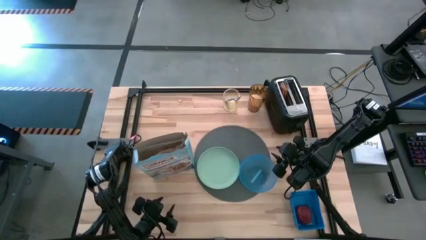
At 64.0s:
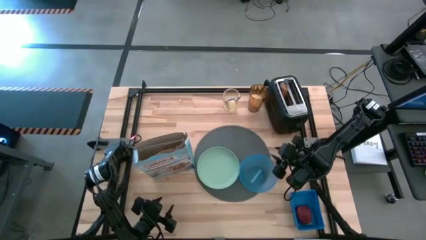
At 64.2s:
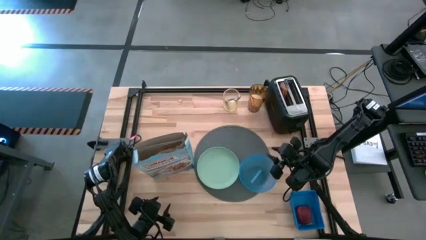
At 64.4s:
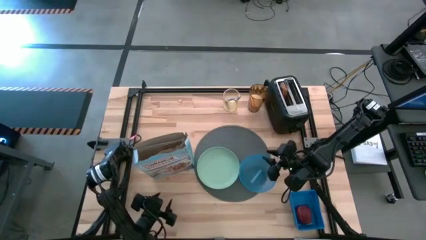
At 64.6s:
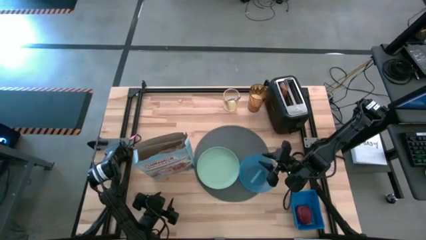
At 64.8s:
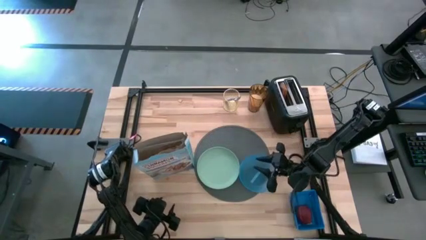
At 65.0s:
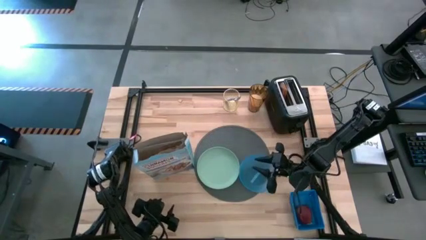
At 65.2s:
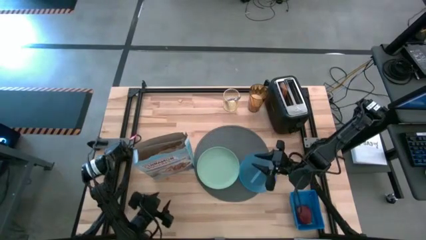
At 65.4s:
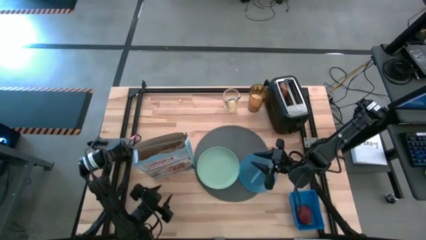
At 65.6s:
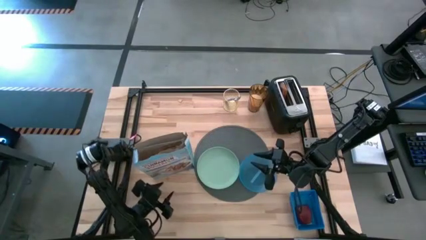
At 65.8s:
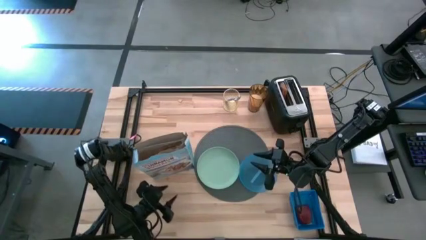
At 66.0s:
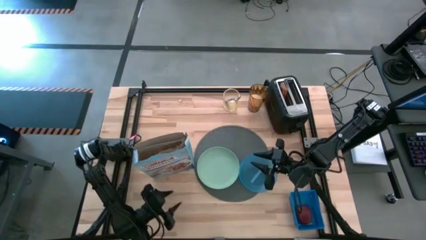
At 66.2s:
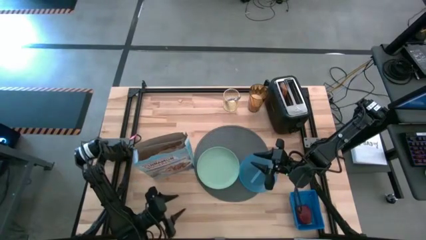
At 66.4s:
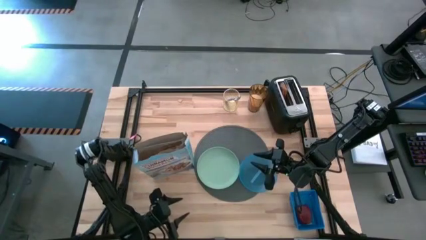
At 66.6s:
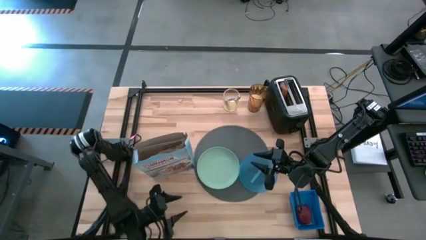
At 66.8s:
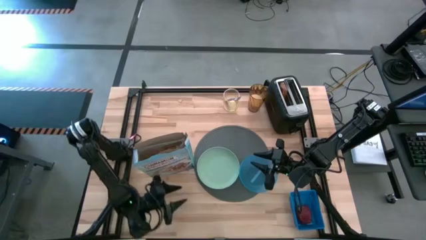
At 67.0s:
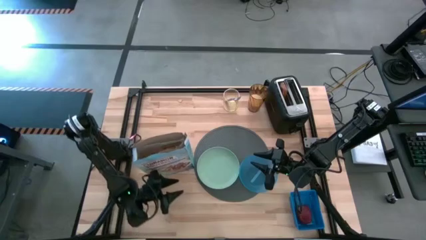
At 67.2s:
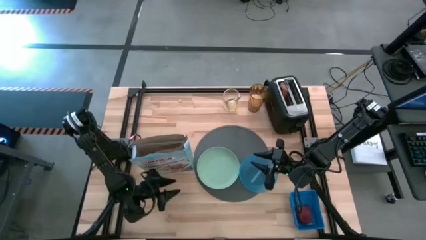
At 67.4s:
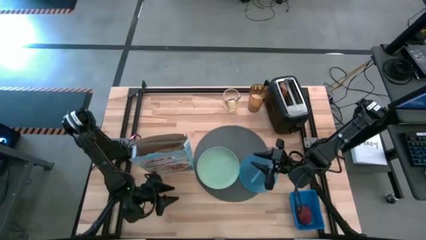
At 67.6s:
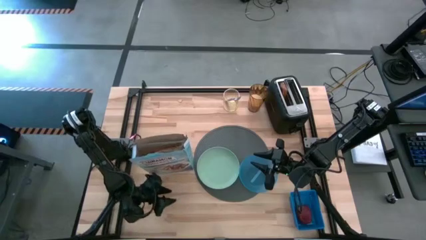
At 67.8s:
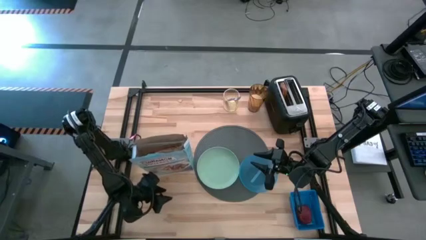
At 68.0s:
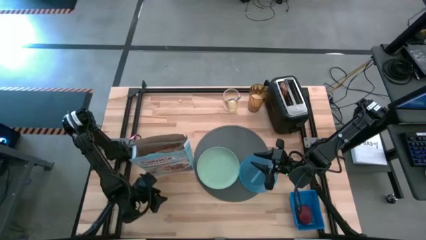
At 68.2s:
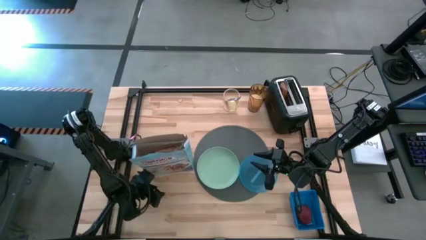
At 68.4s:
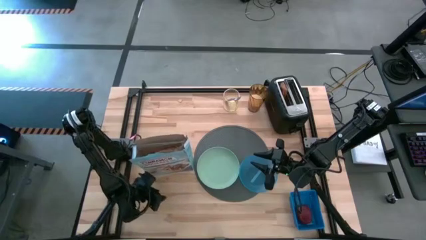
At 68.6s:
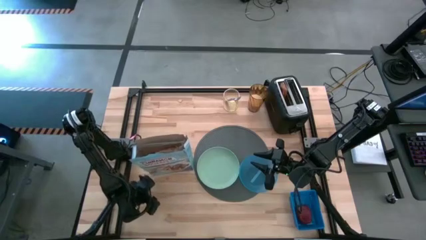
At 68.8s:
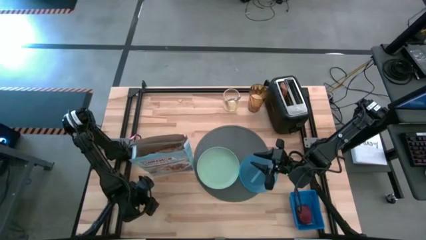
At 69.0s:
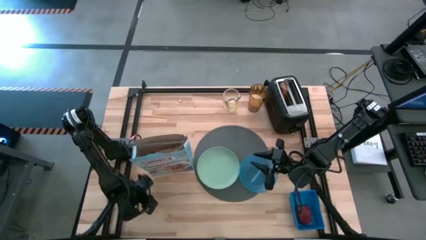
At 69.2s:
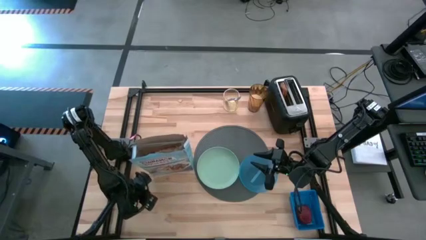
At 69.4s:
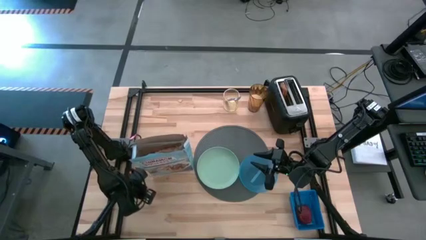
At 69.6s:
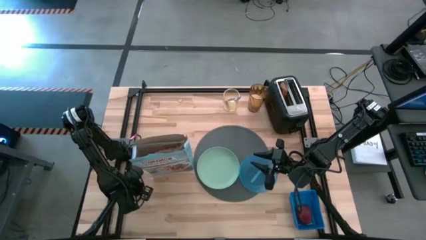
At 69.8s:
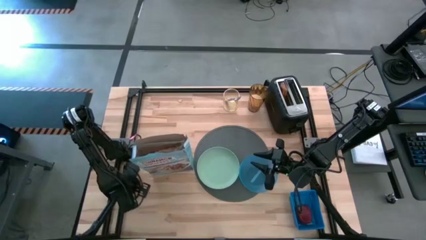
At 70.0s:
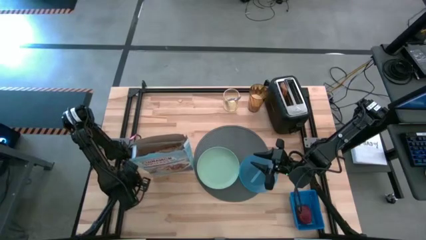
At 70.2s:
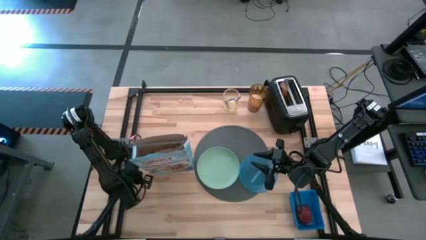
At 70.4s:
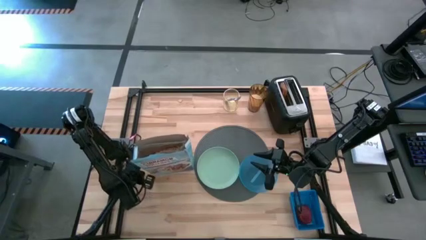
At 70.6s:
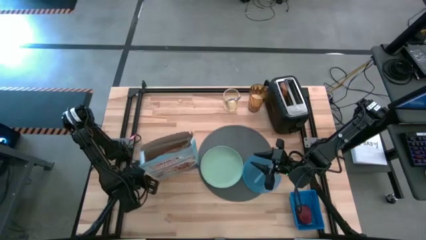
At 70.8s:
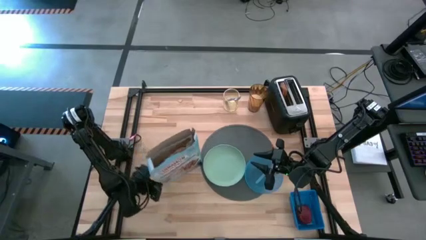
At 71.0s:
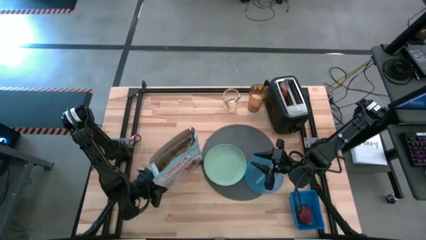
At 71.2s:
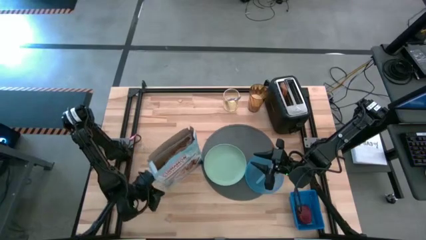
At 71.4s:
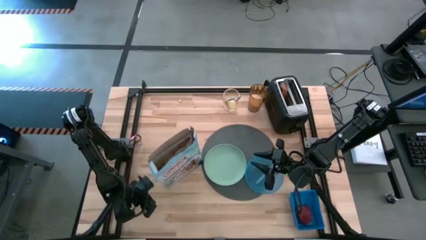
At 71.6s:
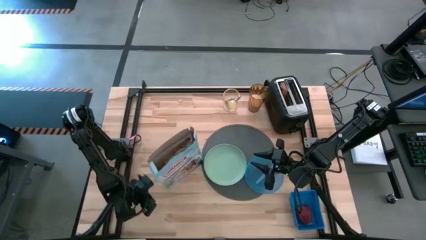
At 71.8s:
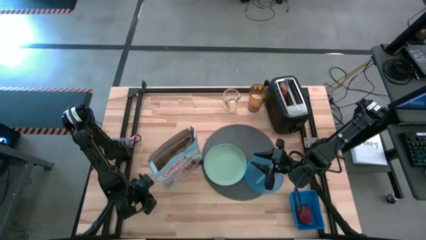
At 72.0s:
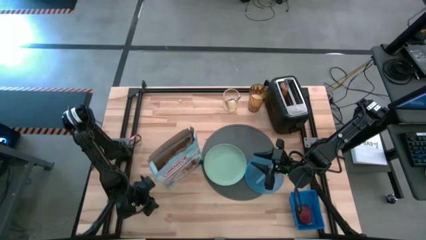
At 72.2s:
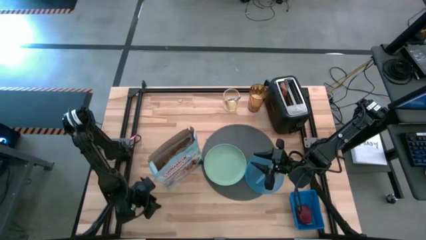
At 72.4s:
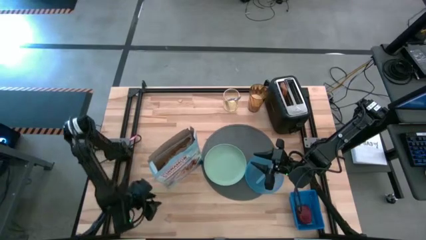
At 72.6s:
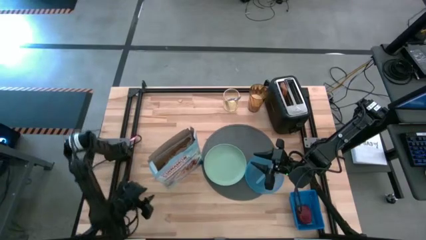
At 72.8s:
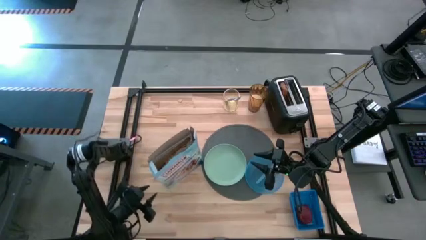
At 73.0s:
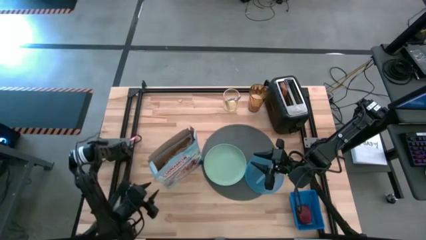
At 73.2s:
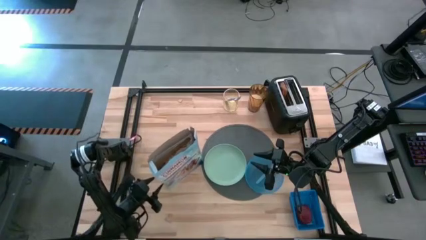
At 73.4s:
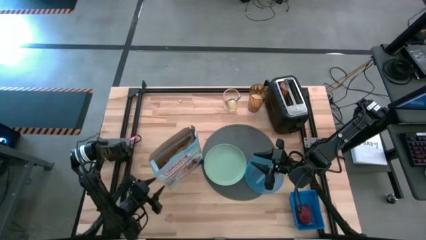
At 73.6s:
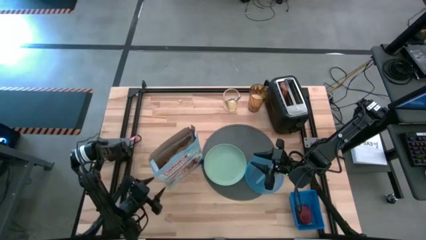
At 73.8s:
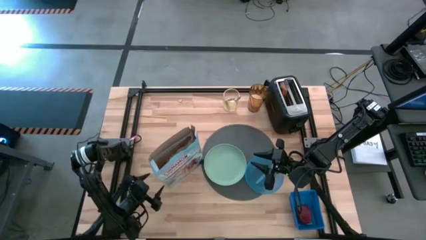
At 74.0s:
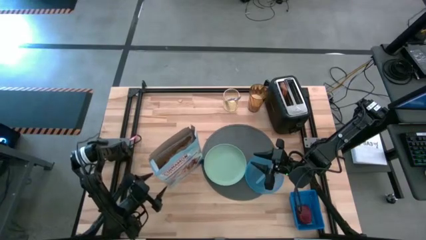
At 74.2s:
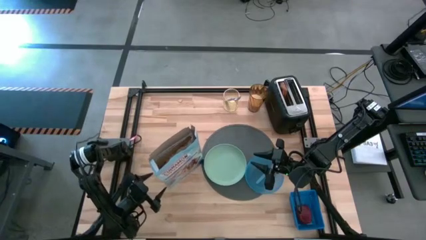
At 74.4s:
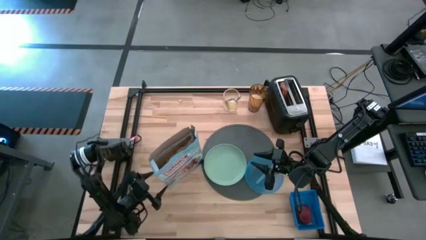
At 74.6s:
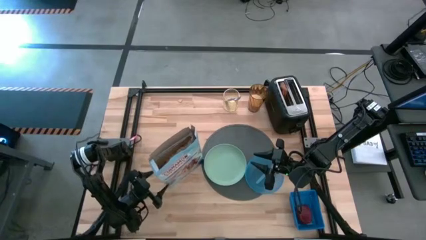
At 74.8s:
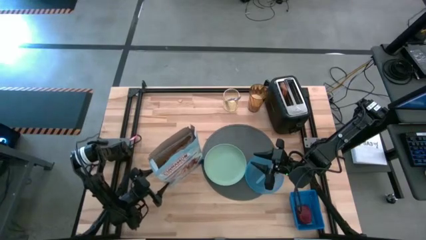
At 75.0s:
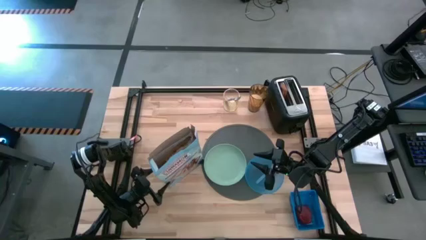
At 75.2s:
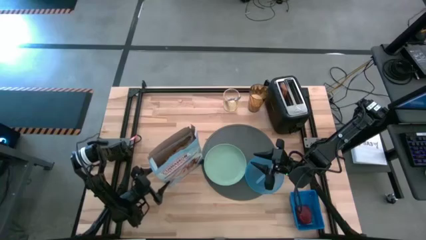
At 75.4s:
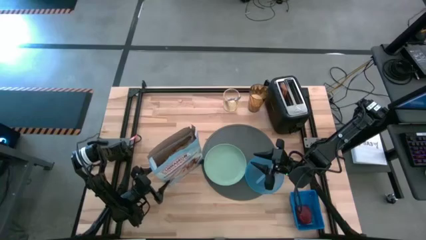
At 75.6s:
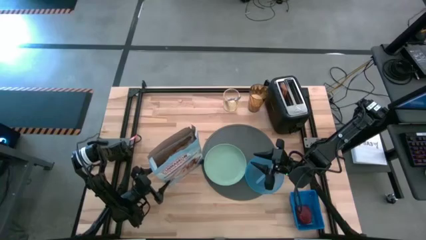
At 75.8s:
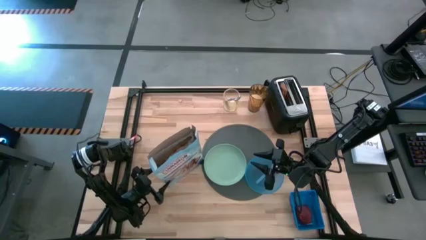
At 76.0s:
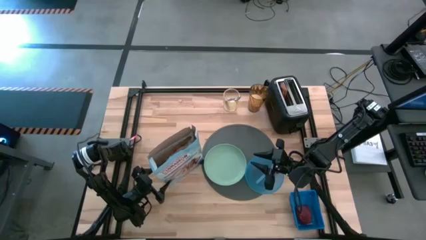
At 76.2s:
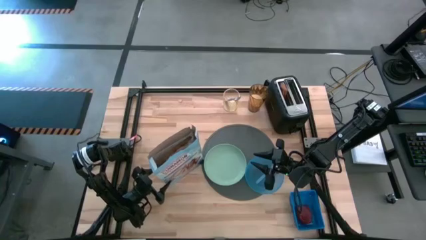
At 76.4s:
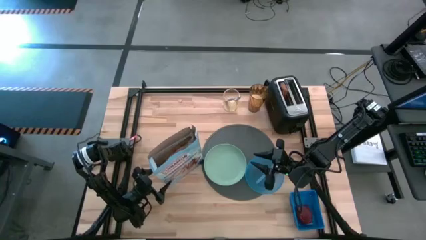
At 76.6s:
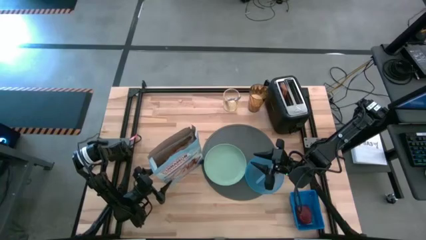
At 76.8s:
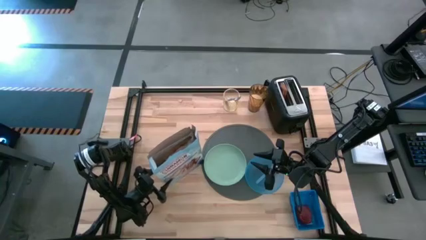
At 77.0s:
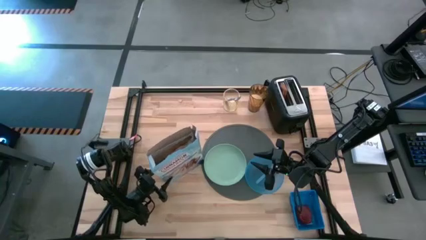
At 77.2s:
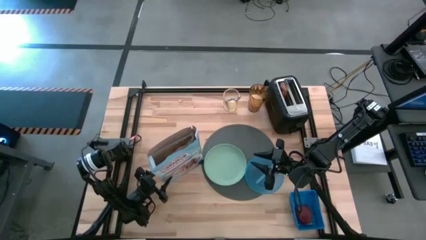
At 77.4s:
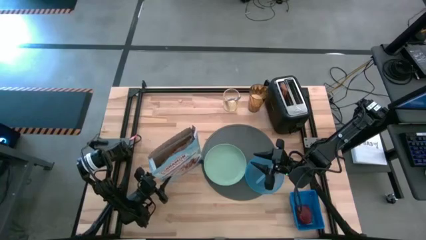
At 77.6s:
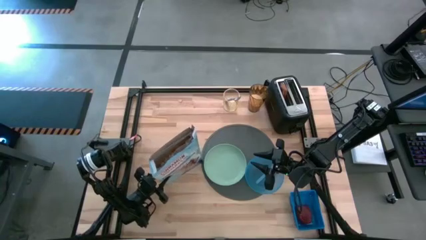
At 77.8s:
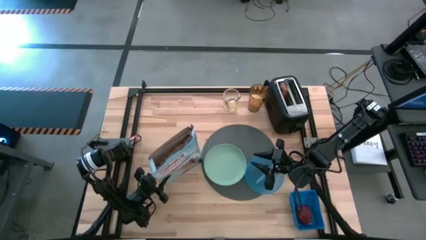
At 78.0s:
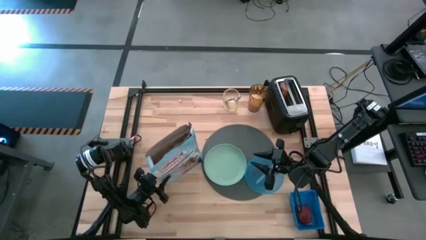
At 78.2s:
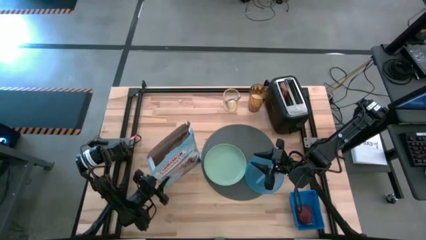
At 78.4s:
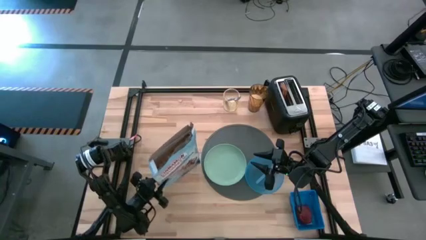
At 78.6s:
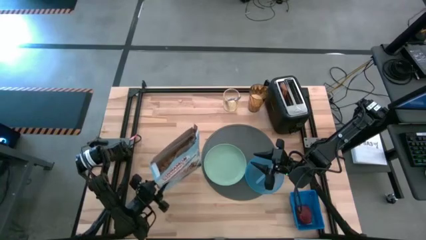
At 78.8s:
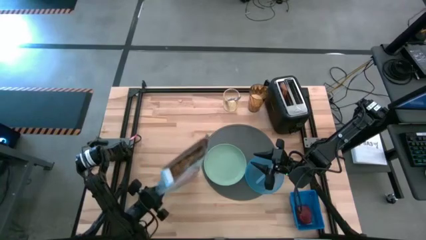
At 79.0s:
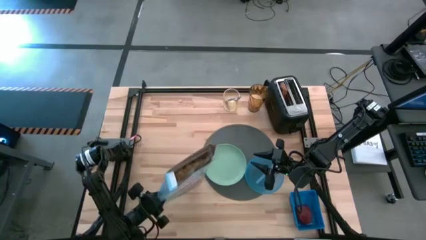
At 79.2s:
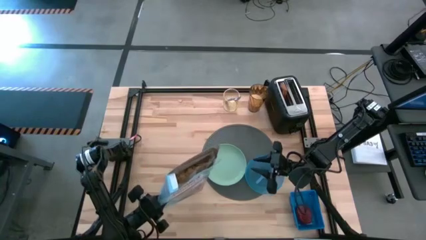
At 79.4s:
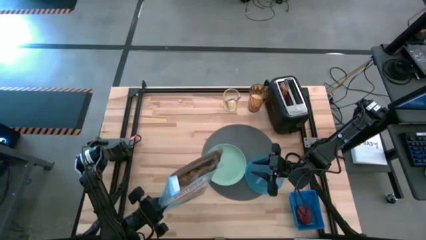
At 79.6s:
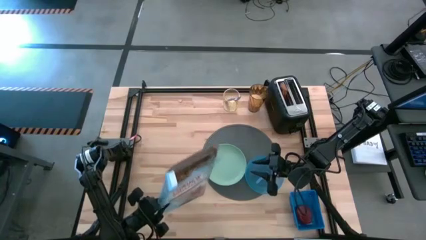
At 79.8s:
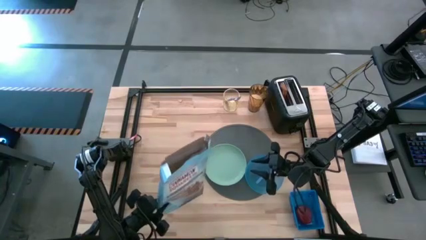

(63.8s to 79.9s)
Task: Arrange a breakfast setting
Pour the cereal from the cereal box into the blue bowl
